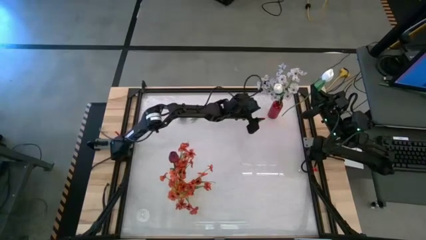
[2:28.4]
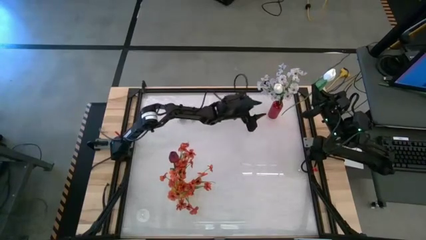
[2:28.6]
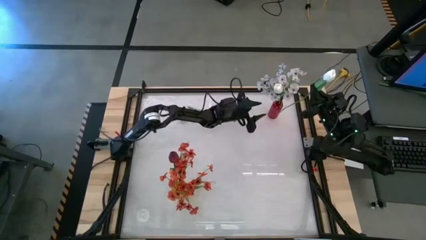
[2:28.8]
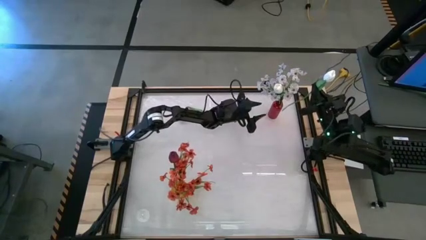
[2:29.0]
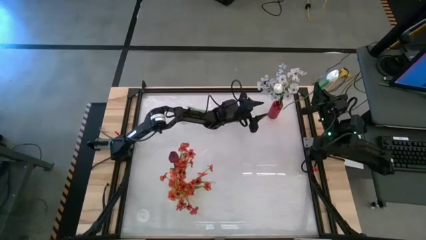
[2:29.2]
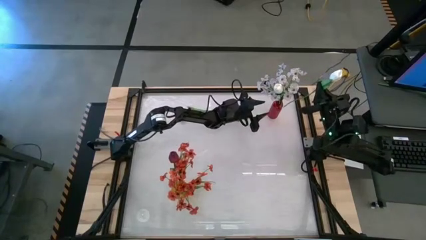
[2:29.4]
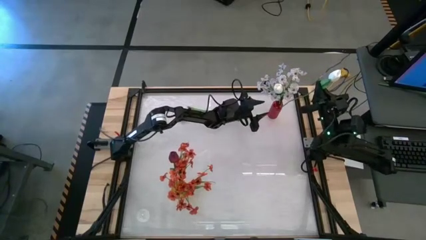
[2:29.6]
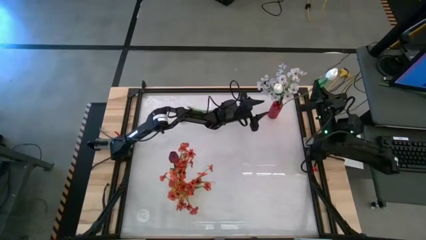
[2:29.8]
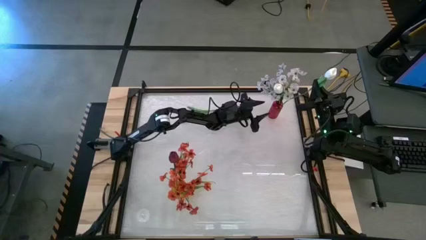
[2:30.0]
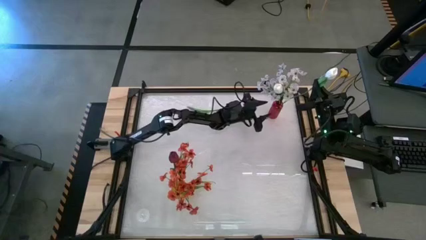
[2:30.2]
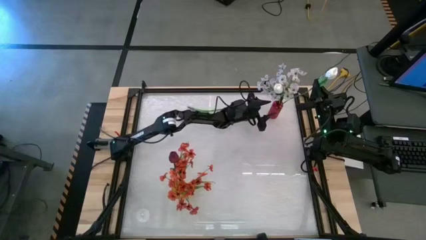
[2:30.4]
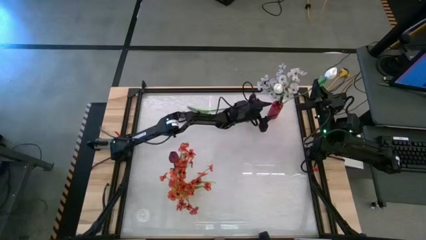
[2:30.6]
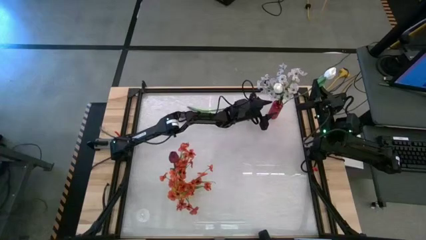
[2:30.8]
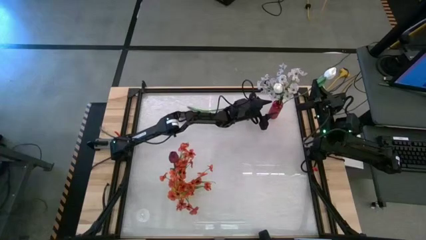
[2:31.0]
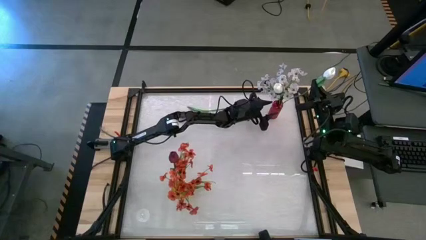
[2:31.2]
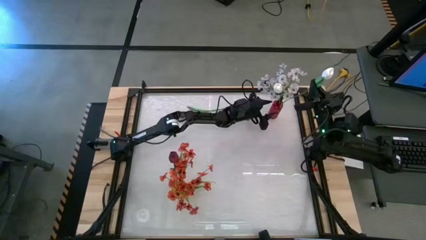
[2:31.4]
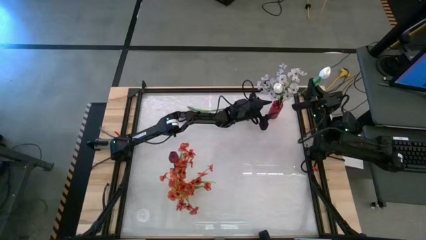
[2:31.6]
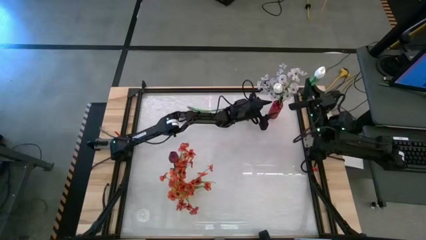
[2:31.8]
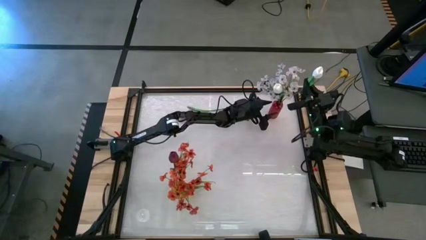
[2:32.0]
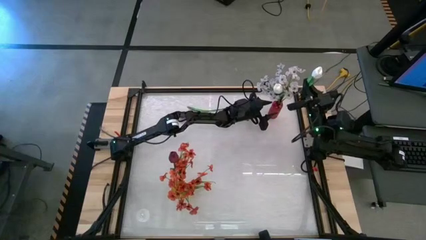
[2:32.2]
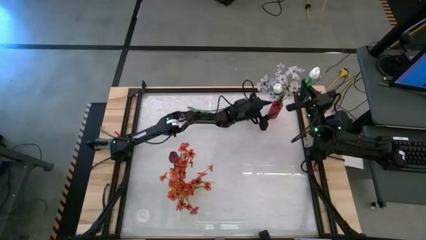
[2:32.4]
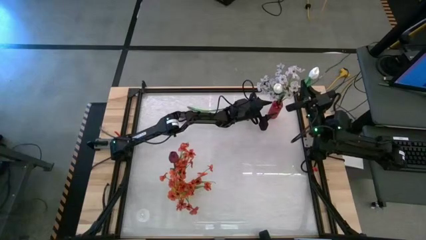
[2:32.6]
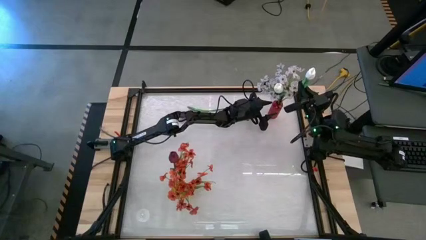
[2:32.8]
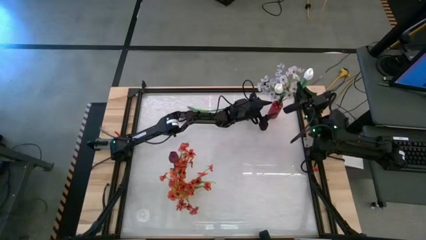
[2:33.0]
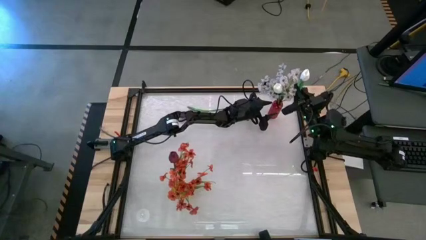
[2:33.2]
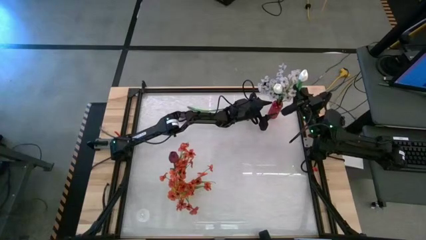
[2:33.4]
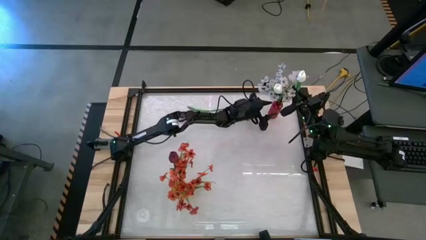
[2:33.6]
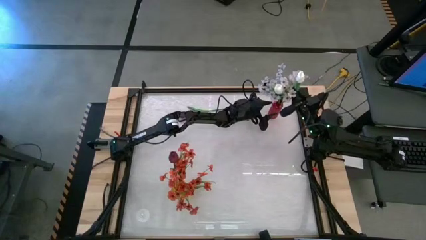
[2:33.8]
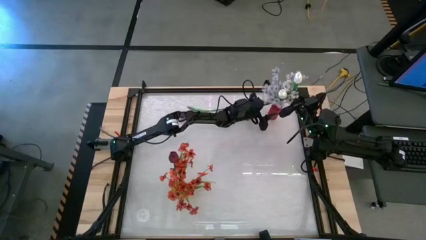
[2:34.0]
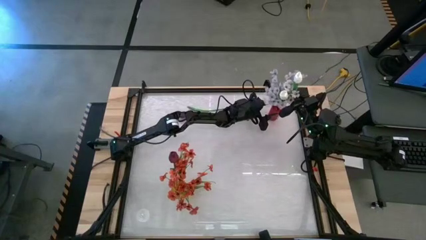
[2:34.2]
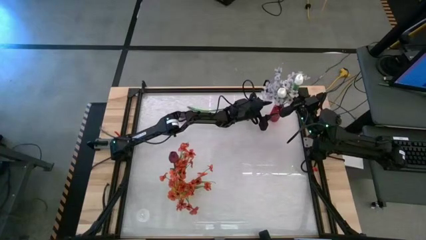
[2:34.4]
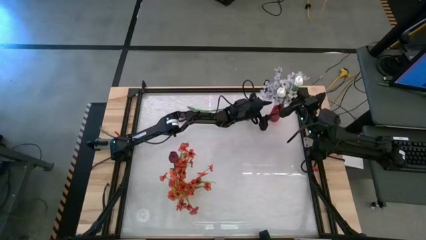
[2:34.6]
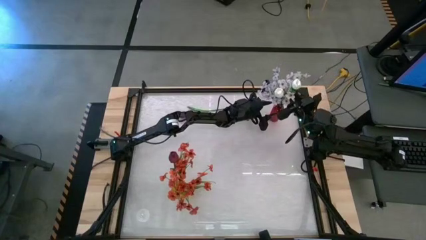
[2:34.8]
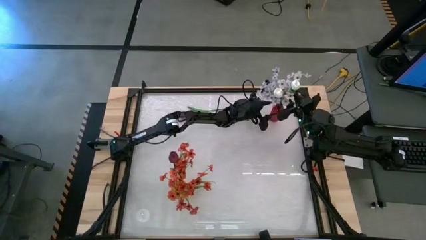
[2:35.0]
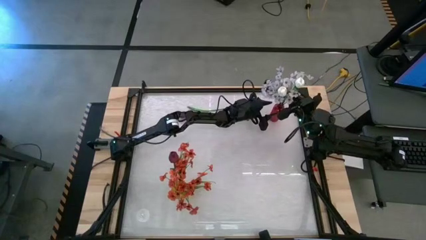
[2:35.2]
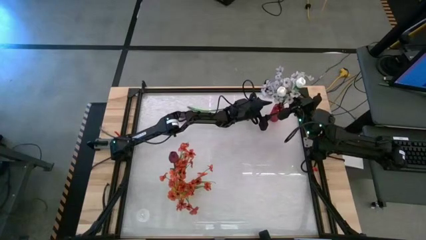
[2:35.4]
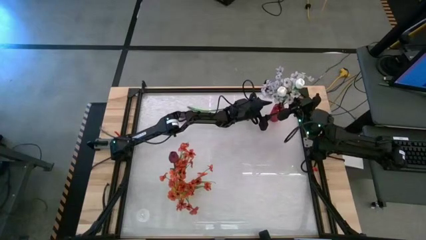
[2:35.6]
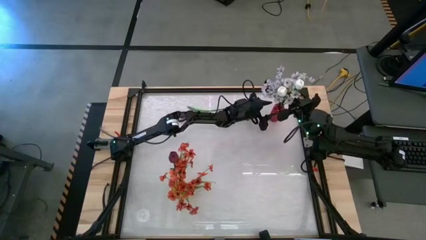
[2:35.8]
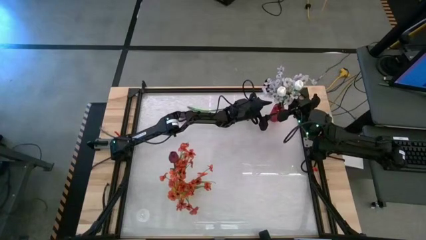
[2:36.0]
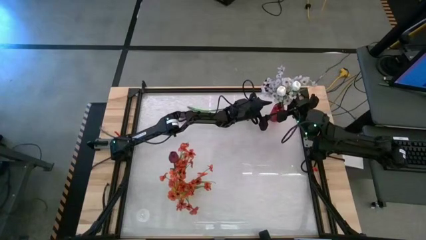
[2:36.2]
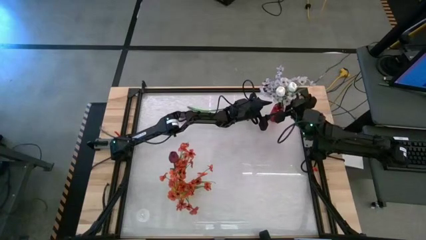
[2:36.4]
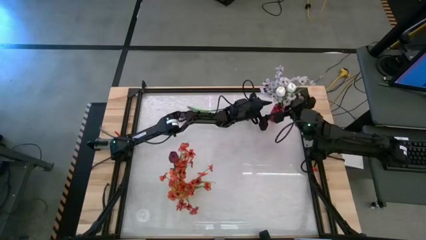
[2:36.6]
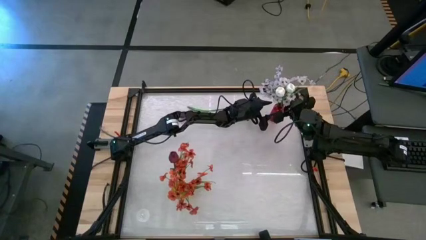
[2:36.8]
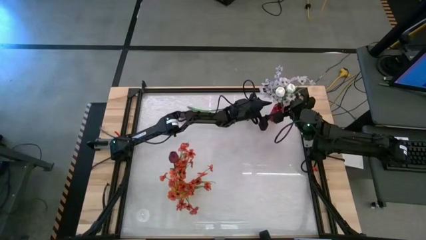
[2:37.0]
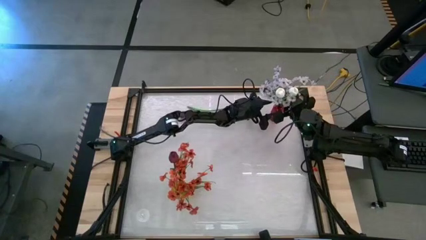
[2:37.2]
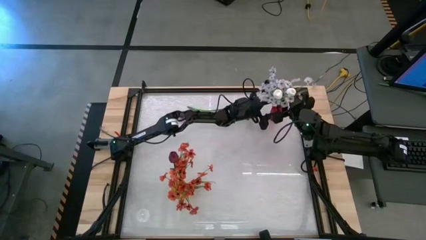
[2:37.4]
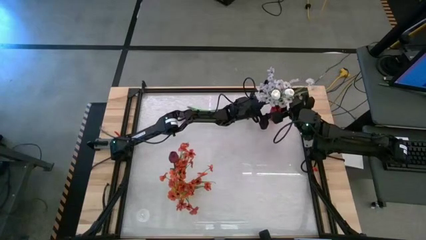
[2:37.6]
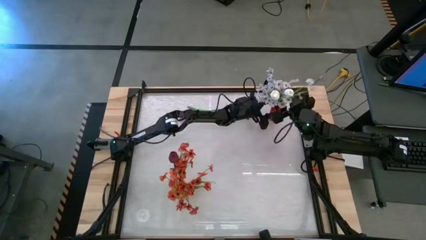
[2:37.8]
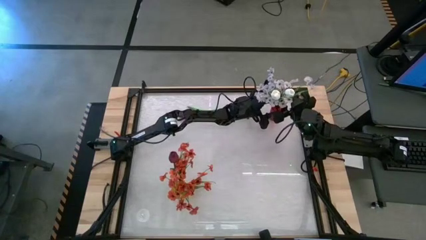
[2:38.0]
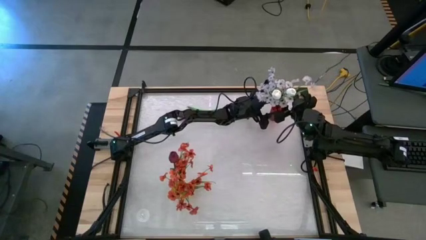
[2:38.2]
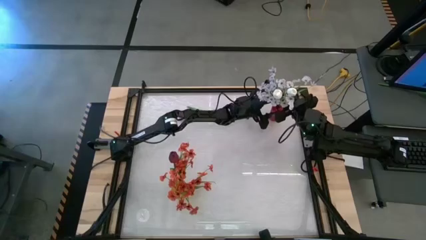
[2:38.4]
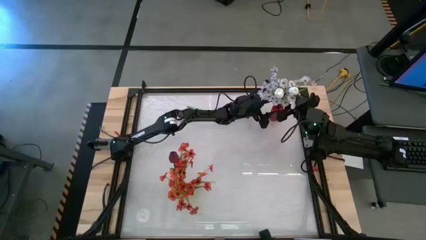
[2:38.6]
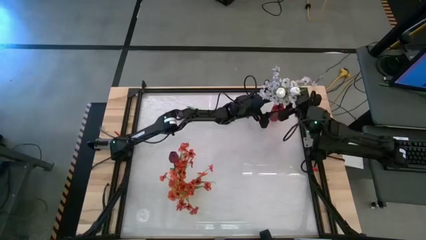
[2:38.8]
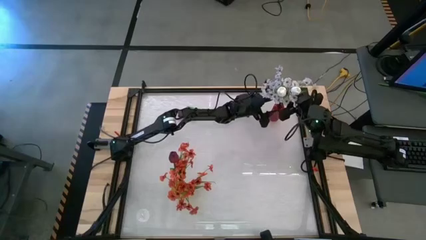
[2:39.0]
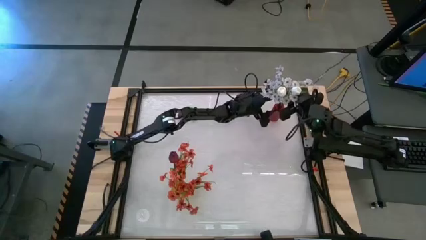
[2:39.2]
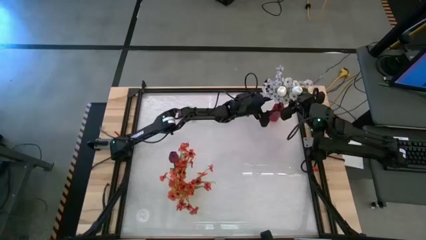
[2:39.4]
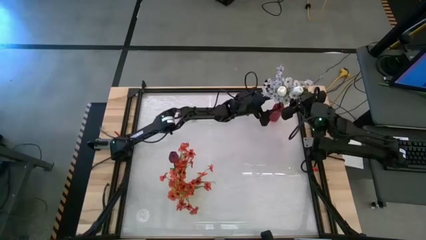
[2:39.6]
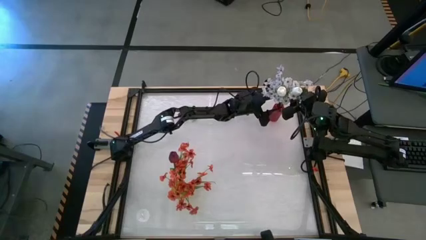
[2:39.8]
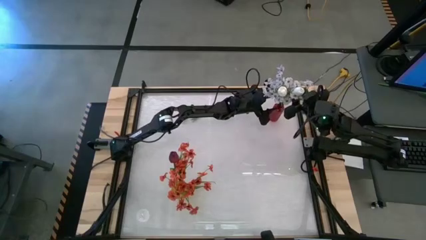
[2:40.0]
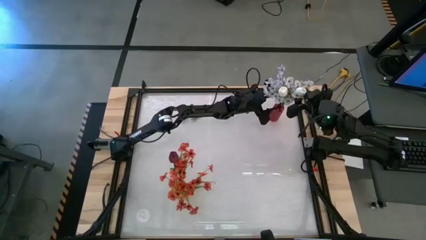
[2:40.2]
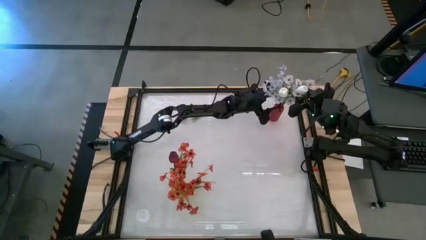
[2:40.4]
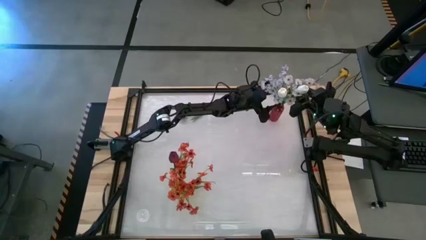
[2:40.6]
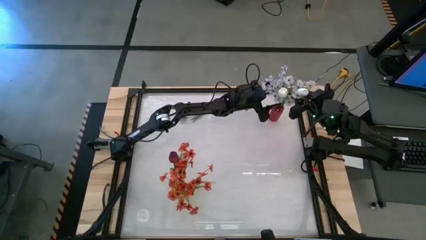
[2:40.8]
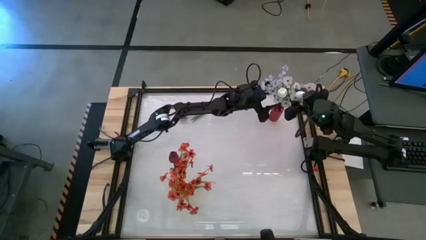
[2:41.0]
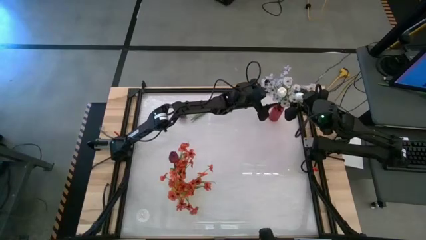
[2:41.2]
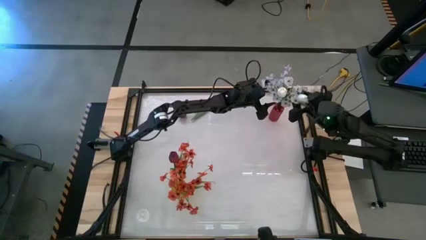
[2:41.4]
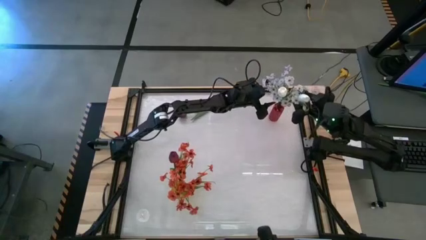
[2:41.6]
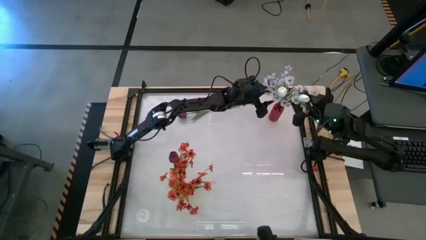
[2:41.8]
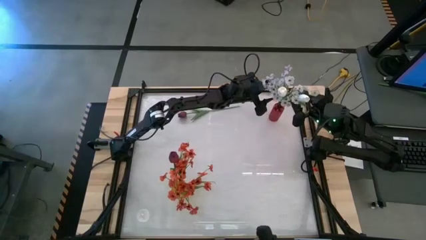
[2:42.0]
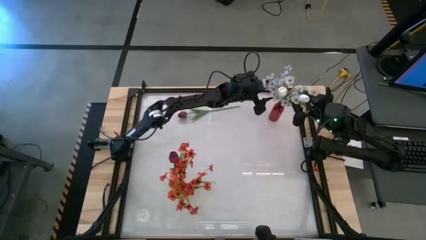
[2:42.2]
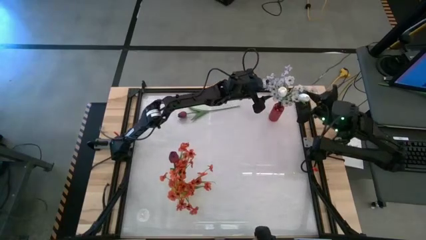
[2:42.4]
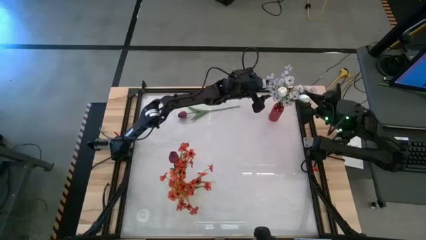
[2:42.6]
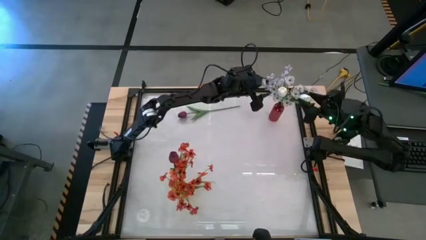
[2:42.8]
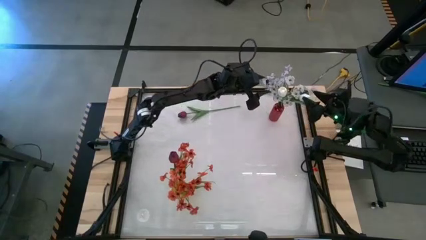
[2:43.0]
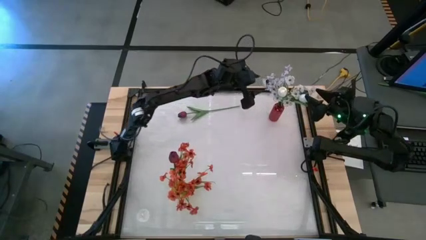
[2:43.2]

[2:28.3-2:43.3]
Task: Sort flowers into vase by color
Put the white tulip into the red vase
